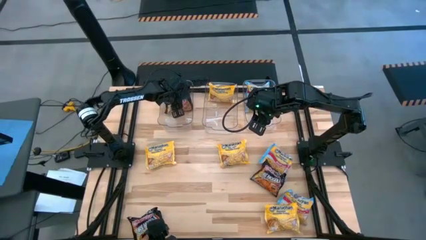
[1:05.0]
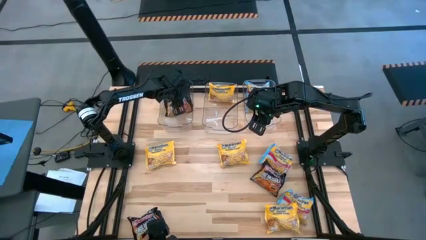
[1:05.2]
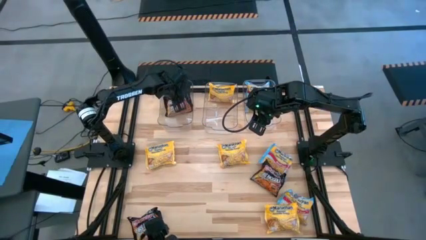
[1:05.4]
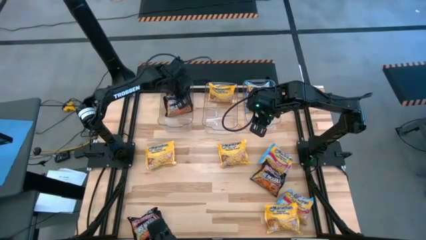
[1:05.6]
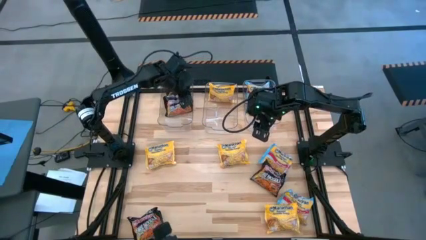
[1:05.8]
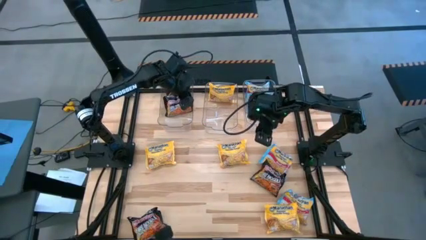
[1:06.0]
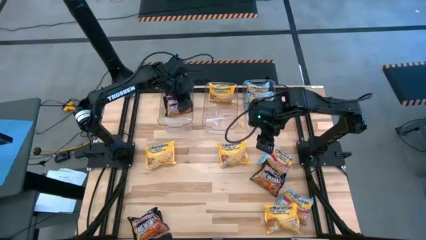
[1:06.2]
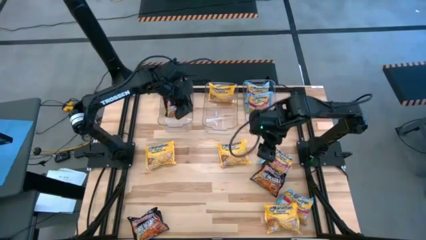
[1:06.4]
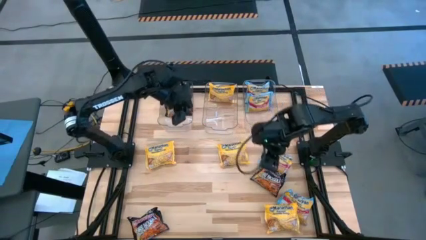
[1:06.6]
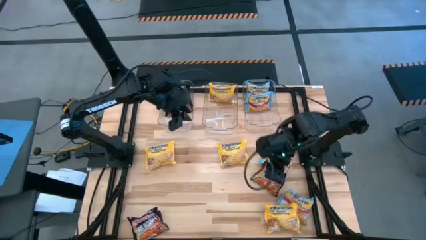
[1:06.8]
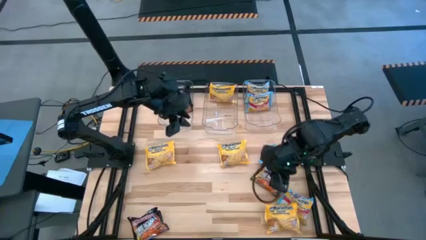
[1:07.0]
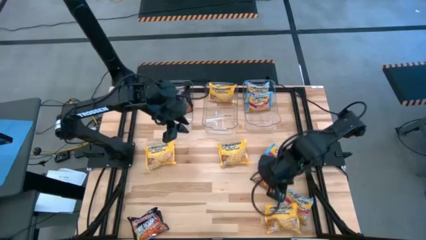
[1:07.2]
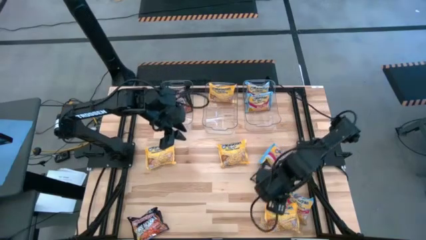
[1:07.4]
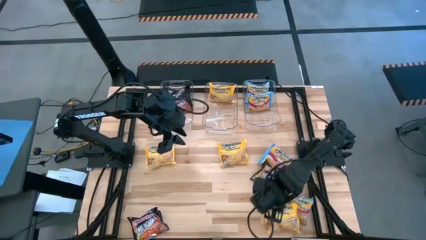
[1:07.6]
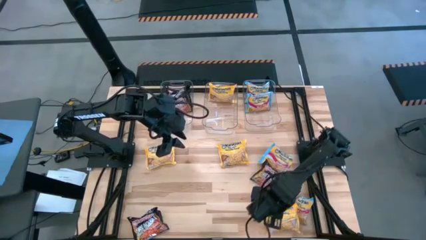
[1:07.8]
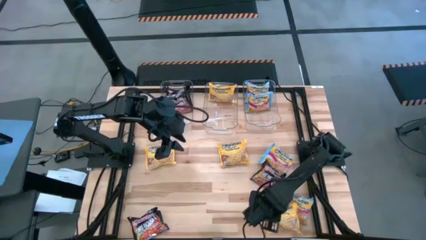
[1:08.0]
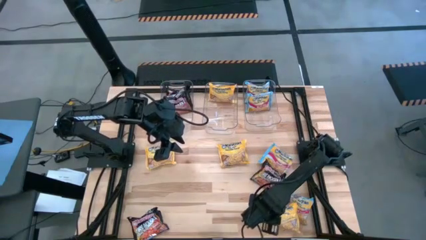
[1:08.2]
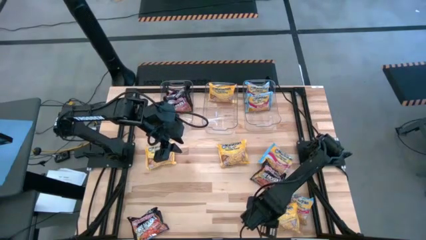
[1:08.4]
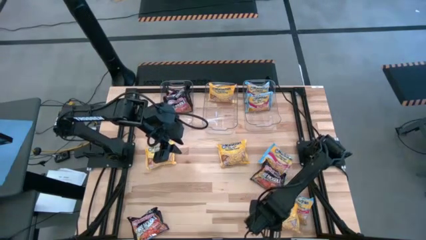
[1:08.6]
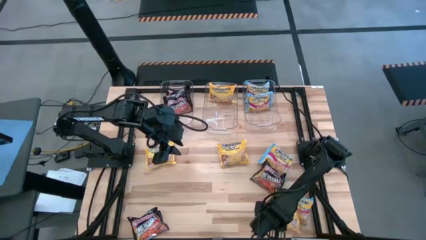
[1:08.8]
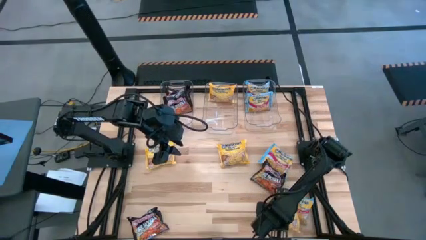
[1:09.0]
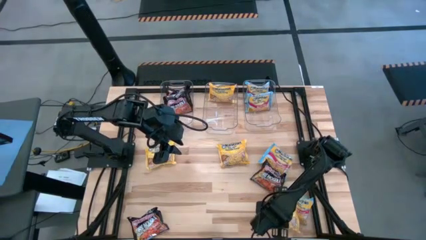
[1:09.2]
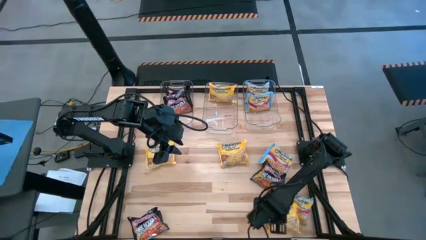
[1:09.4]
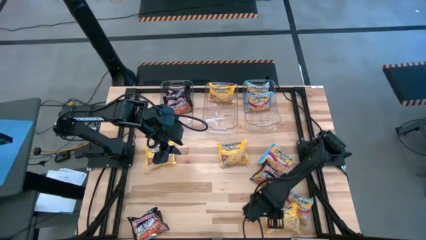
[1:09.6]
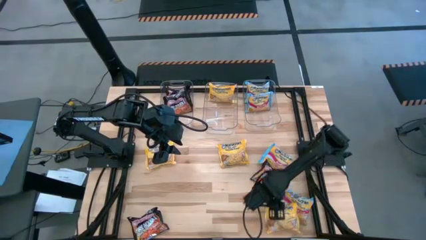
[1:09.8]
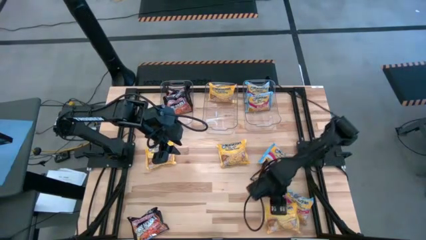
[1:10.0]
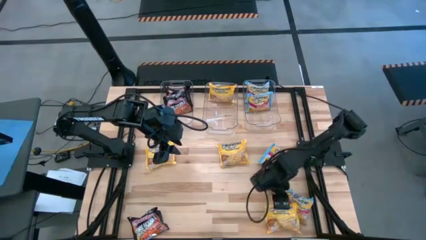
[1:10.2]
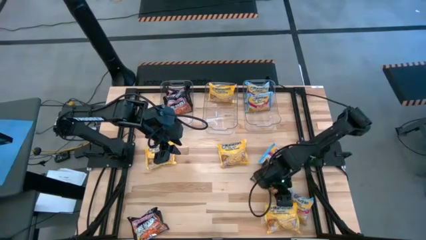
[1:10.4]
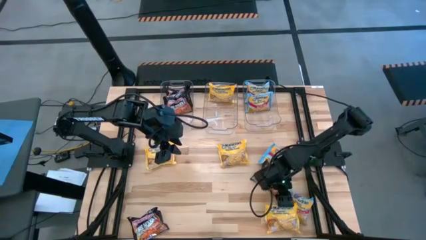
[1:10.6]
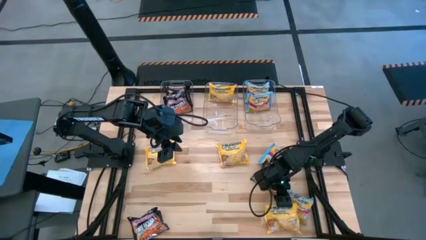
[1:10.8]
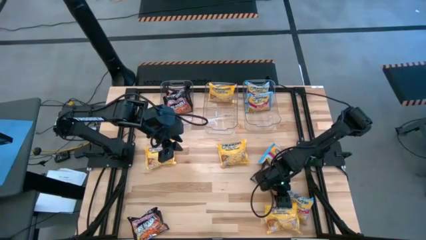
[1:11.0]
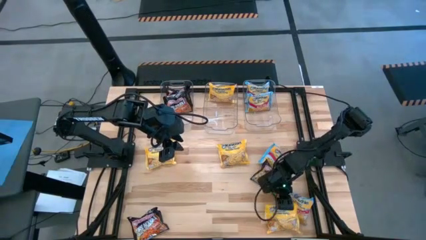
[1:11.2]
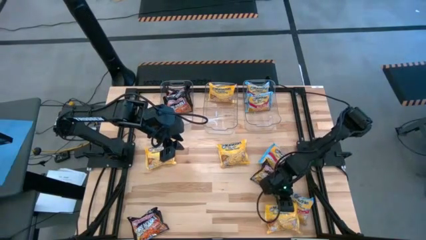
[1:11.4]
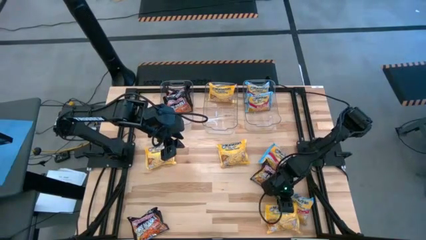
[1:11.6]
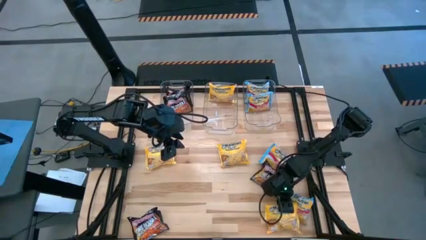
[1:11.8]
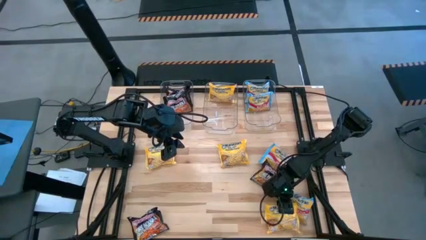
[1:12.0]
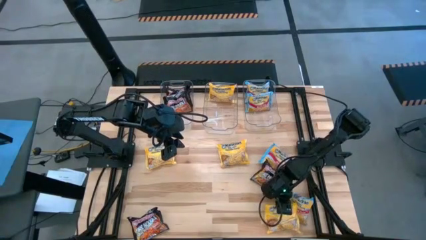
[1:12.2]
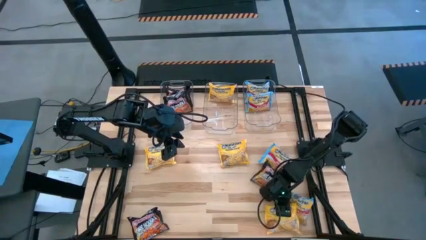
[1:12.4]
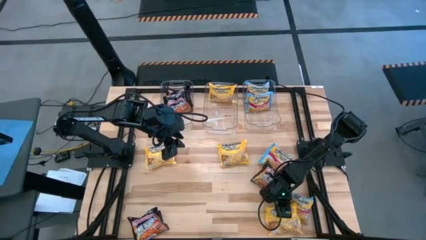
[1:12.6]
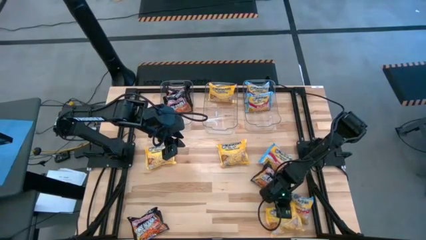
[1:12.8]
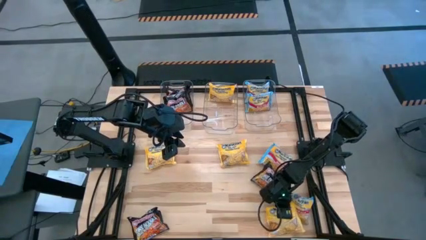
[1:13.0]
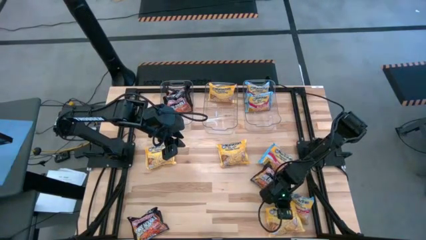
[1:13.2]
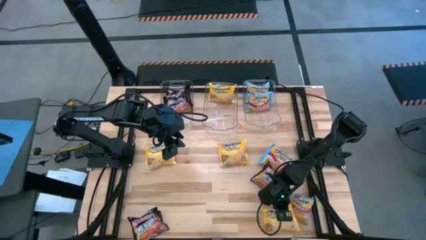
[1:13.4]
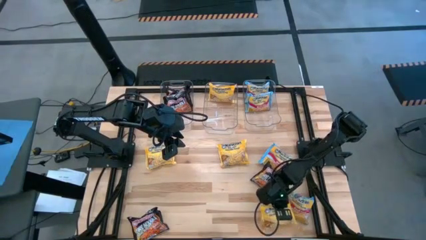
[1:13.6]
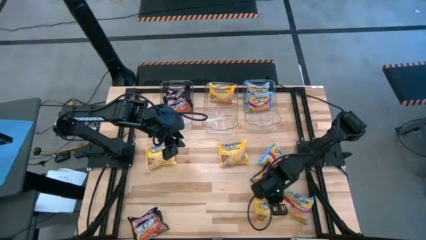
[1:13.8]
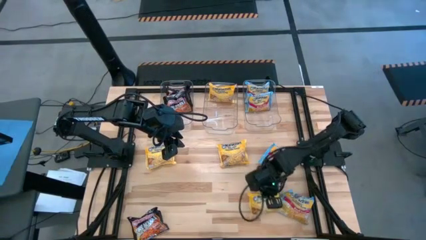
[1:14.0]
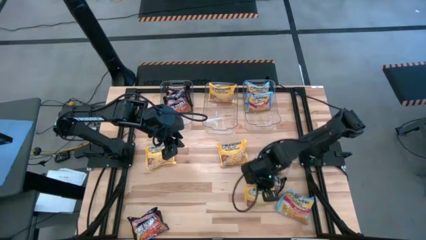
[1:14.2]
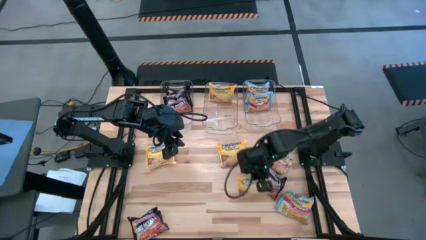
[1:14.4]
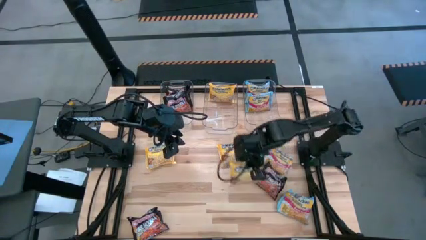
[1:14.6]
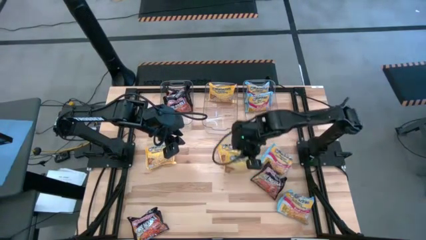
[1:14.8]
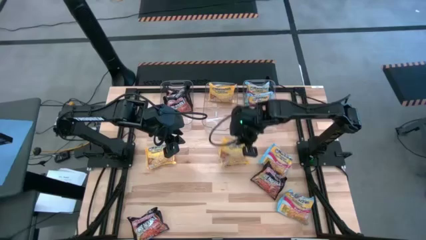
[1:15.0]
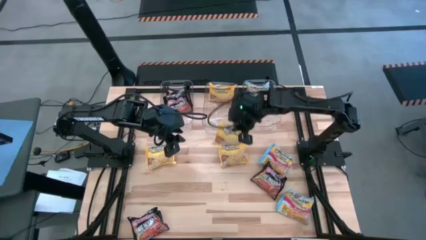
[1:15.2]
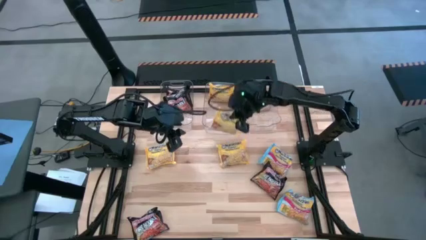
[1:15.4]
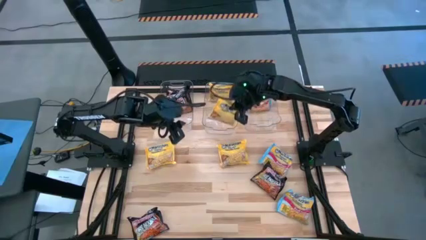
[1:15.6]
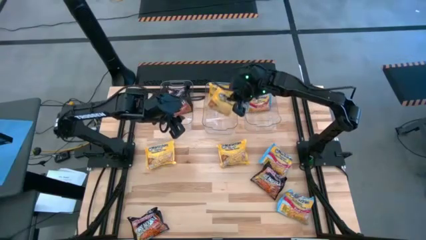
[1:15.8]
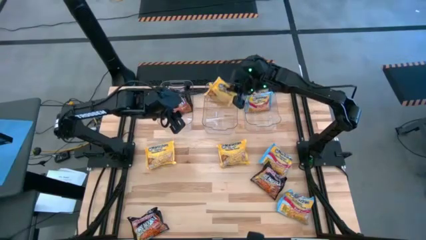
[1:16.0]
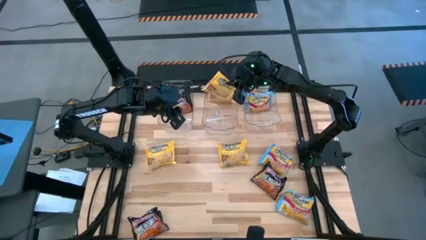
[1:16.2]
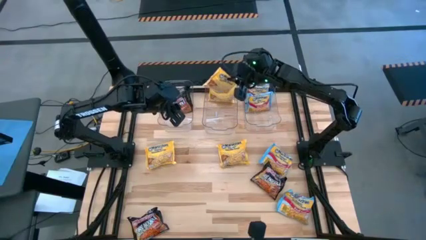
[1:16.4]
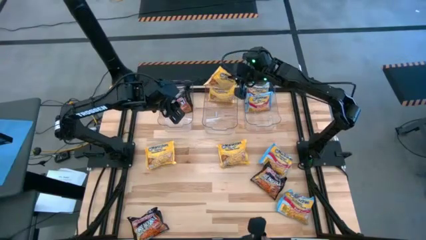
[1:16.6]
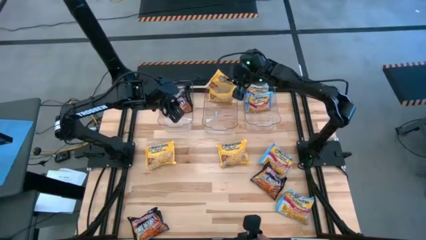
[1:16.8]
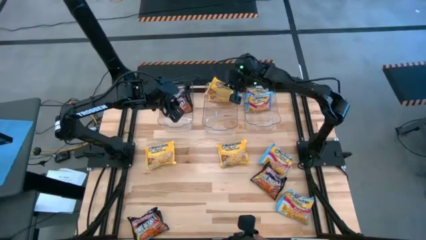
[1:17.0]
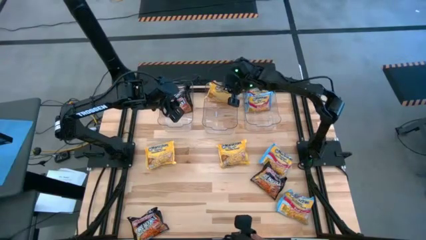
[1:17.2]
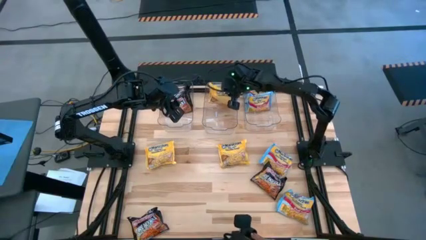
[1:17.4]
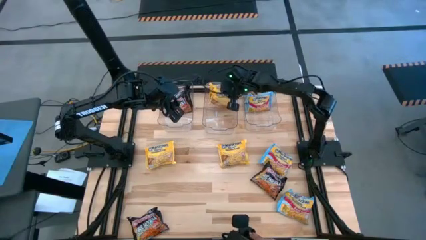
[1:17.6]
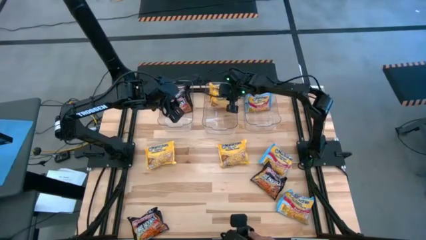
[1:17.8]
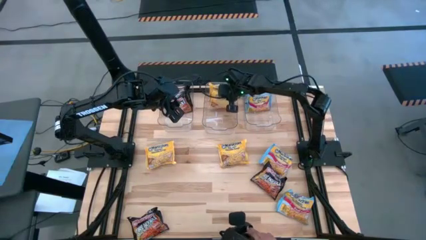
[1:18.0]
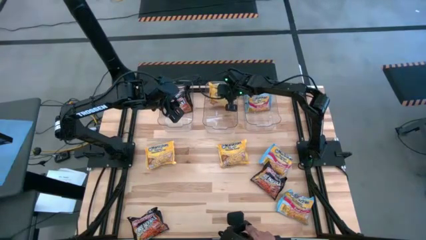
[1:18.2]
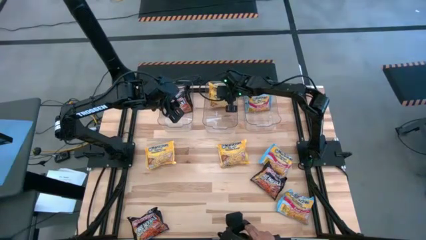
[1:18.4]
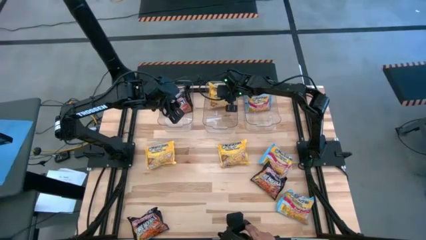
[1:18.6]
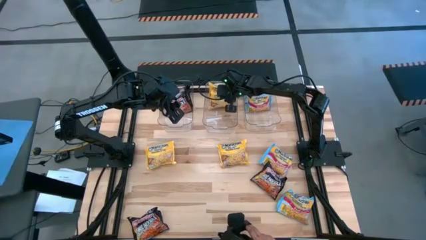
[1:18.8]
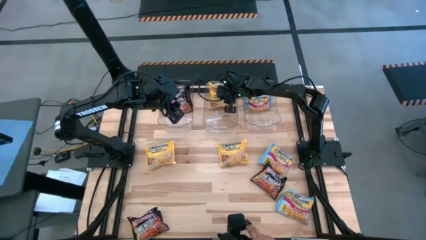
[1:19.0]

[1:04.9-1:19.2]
Task: Sort Maruchan noodles
Put the yellow noodle pack into the middle transparent bin

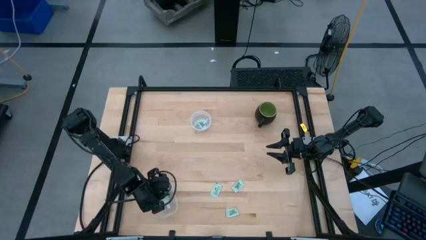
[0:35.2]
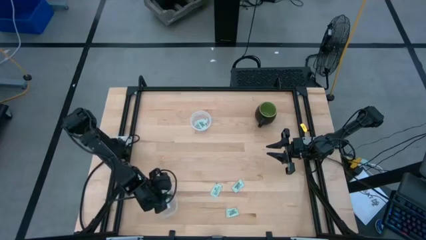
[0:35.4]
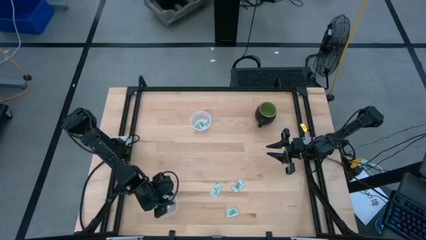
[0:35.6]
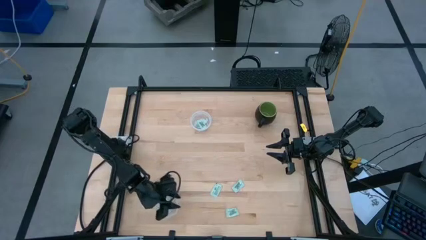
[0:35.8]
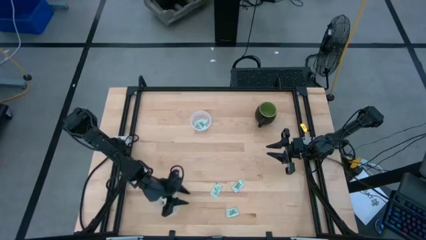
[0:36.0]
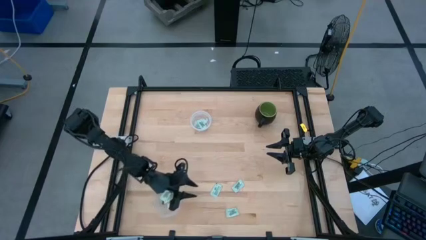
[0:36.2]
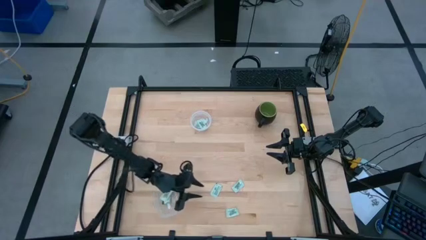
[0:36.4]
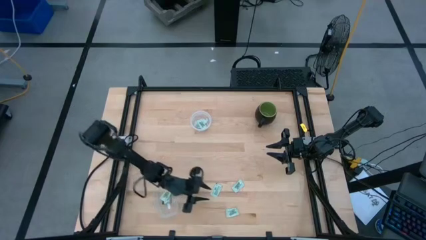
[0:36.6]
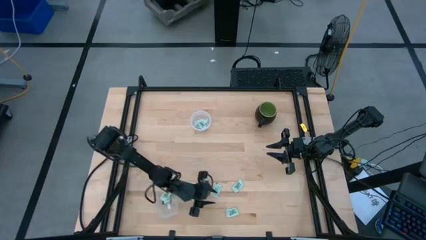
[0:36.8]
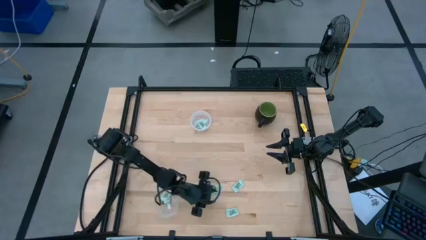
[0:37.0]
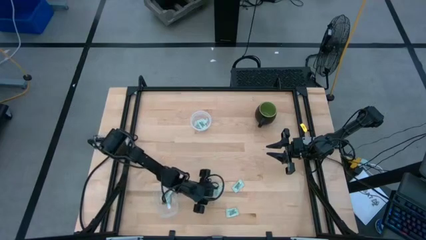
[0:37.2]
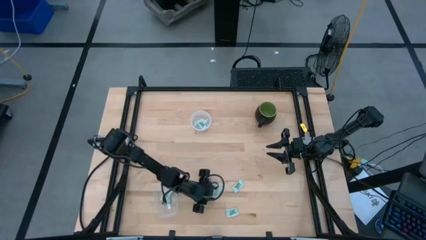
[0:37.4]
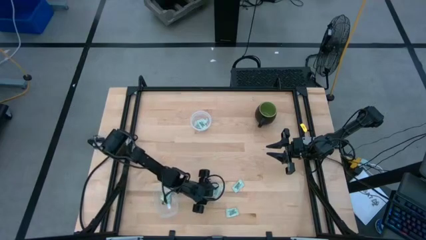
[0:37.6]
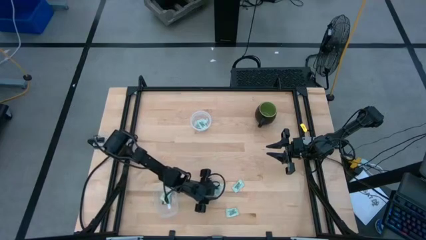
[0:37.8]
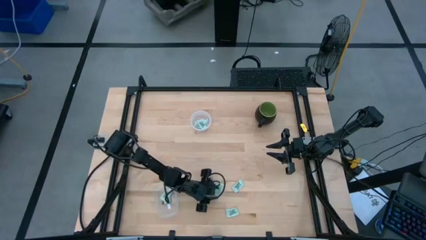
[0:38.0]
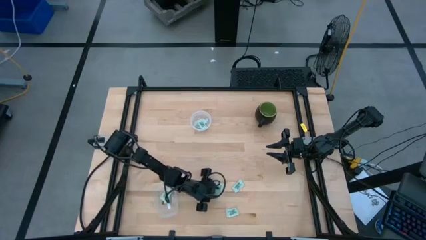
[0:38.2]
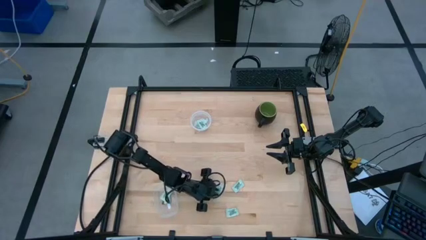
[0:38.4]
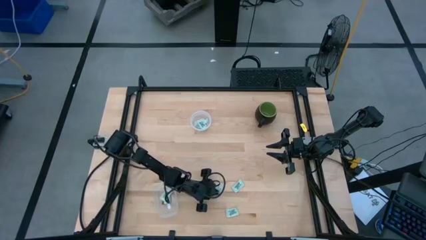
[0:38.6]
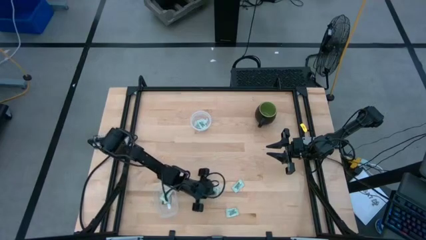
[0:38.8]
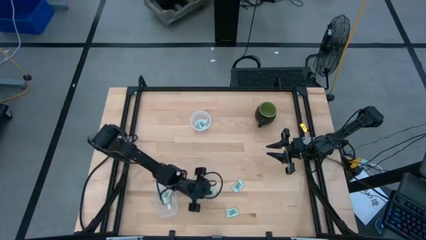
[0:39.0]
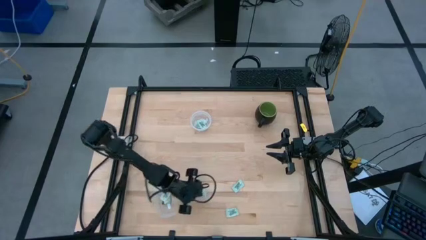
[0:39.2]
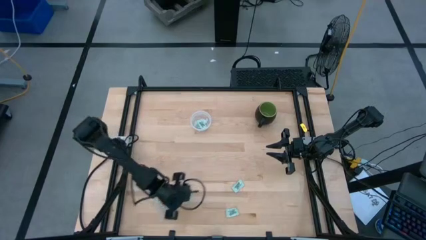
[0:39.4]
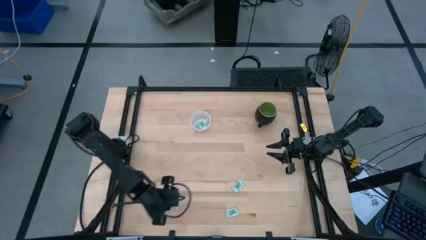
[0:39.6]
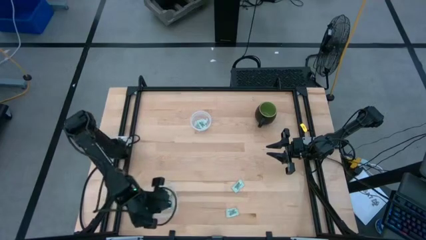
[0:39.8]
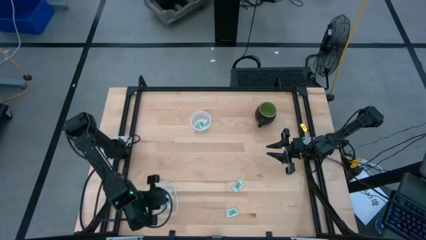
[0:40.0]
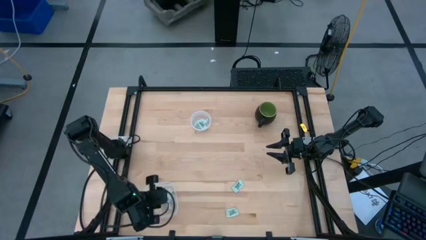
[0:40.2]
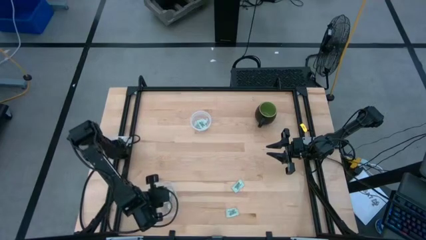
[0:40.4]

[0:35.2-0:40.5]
Task: Pick and place Stevia / Truvia into bins
Put the stevia packet into the transparent rectangle container
